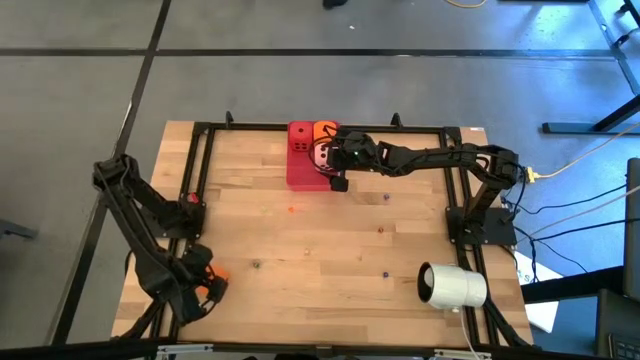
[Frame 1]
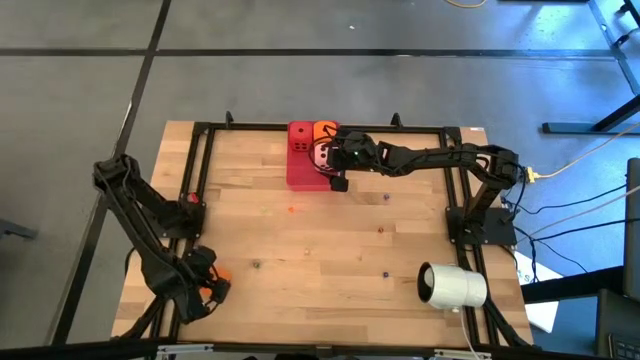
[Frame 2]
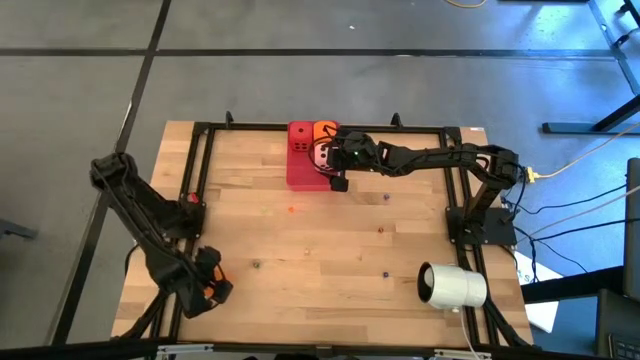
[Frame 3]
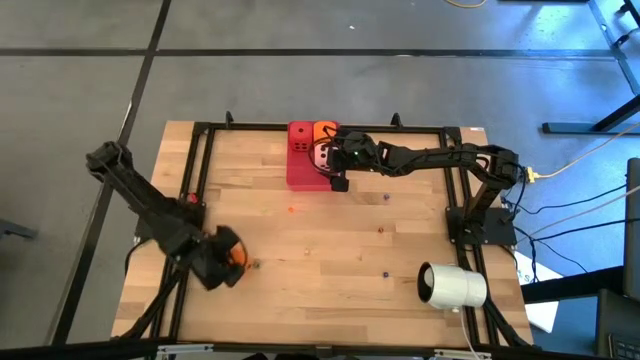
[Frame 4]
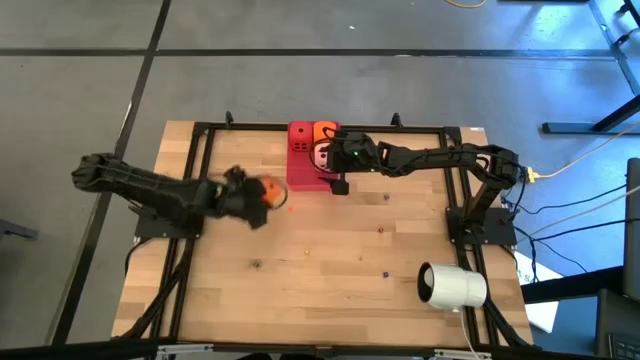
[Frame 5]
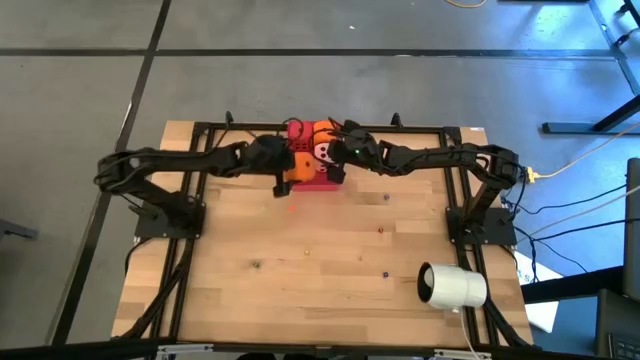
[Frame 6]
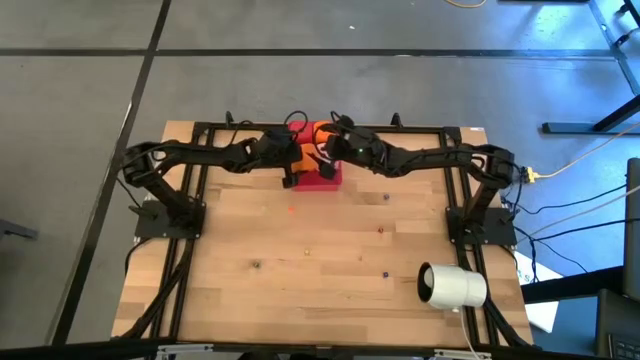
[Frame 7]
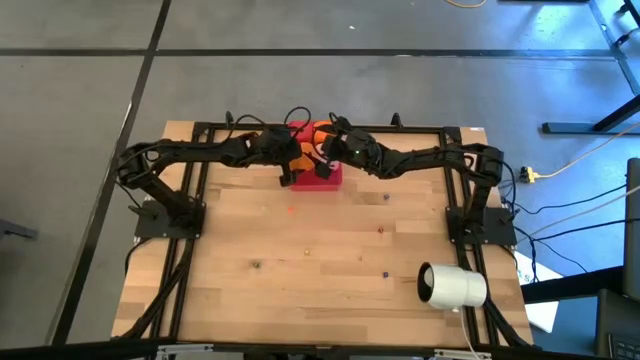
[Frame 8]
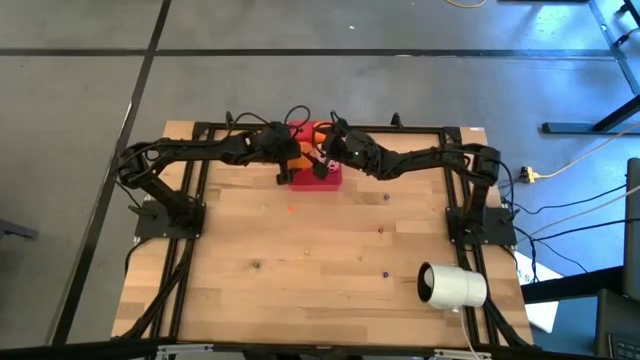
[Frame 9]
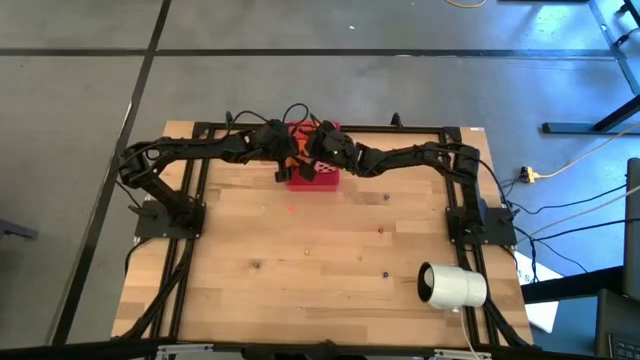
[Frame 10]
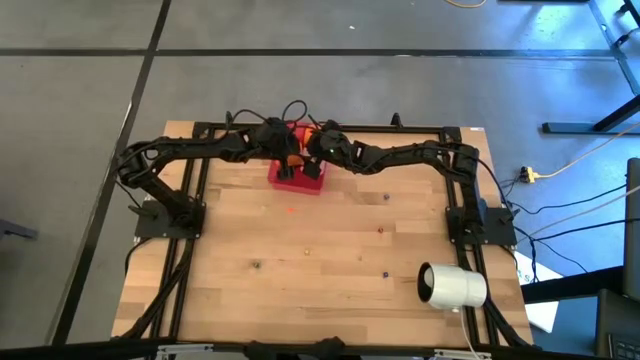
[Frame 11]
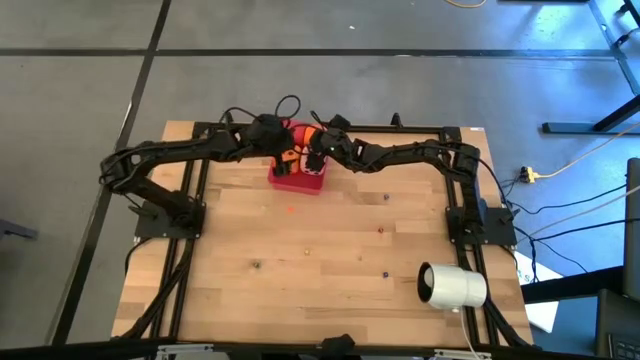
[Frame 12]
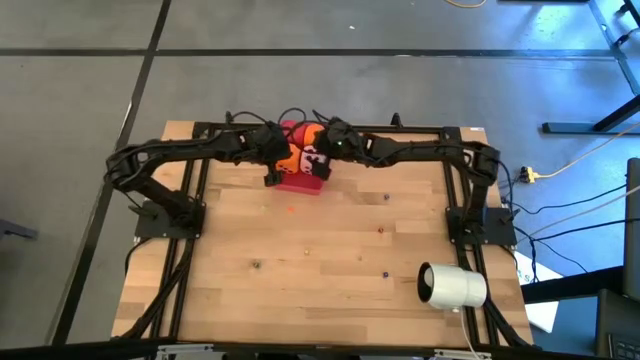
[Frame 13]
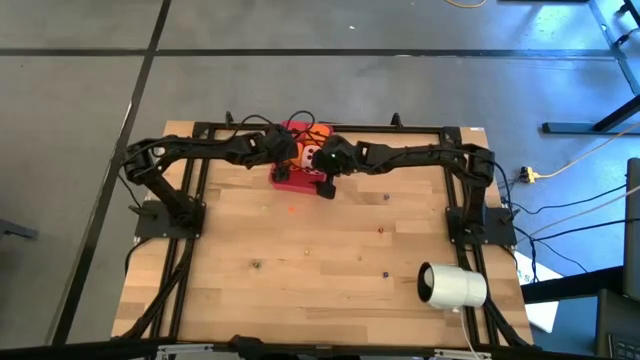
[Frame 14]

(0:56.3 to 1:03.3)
Task: Pick & Place Dice
Put the large orange dice into the bin

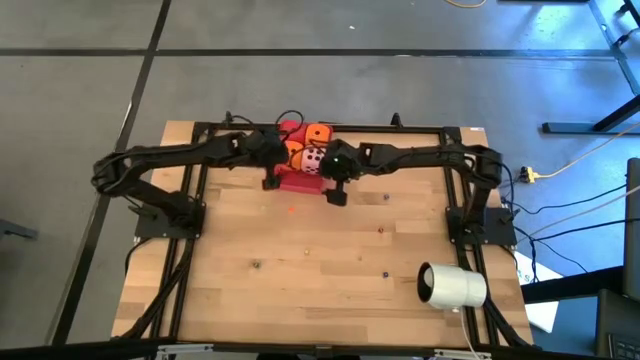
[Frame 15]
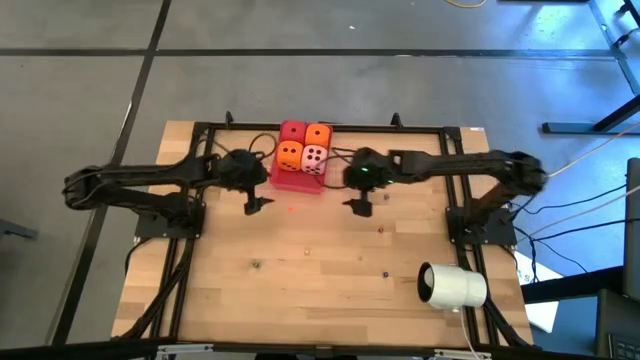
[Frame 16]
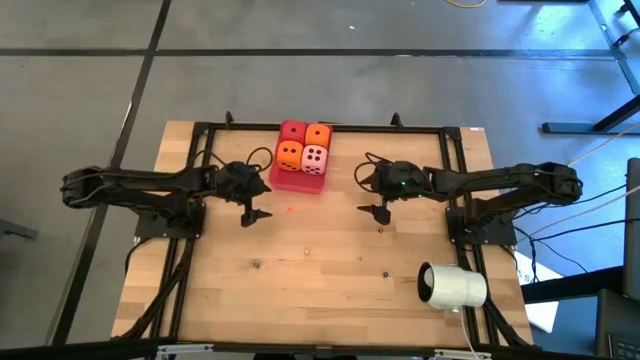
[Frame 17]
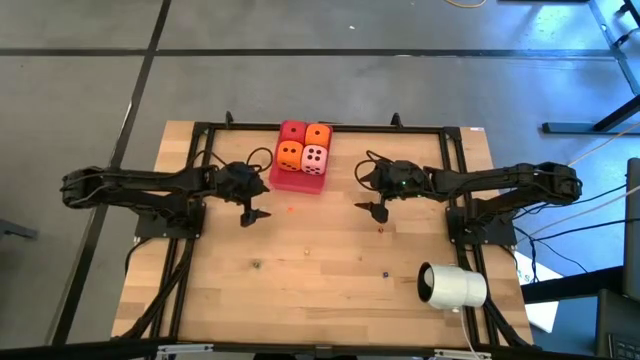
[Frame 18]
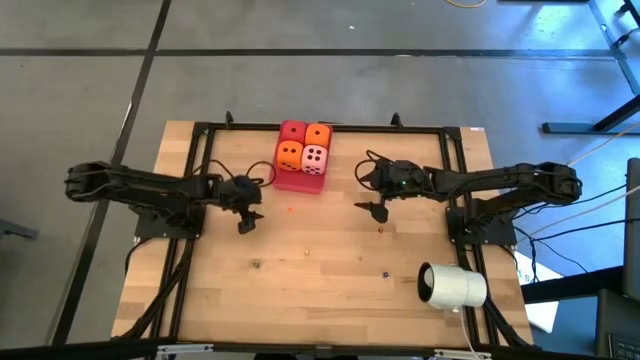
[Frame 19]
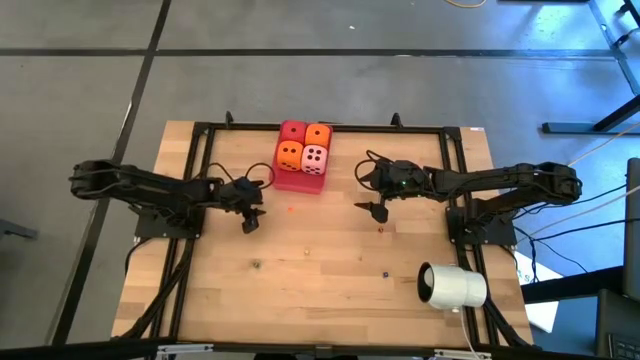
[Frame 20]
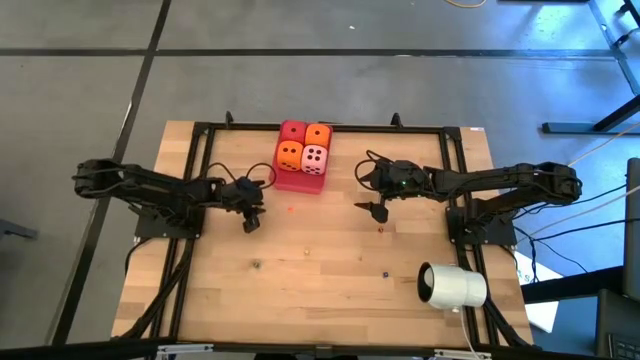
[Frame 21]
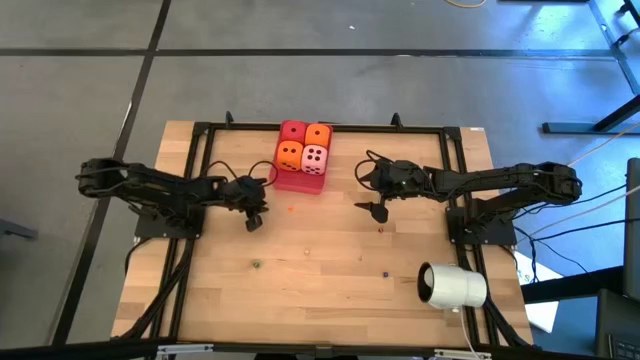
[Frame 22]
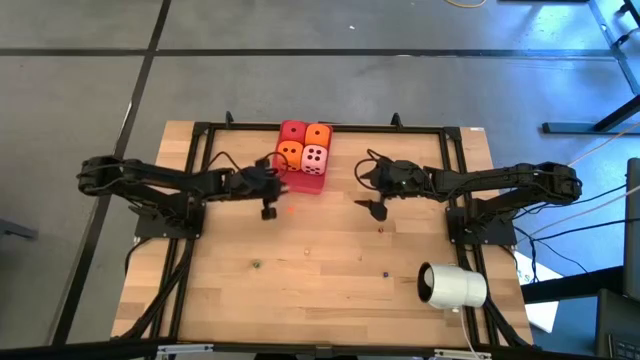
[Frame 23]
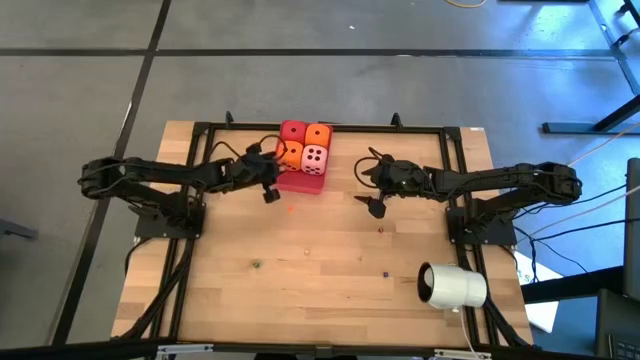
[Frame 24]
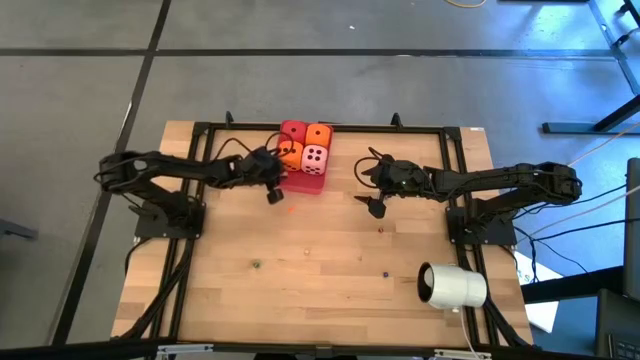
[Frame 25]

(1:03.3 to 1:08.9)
Put the small light green dice into the bin

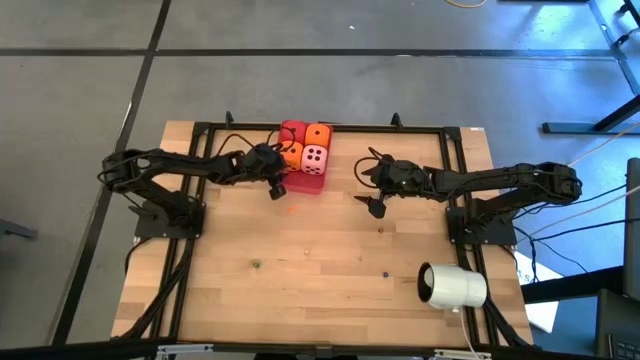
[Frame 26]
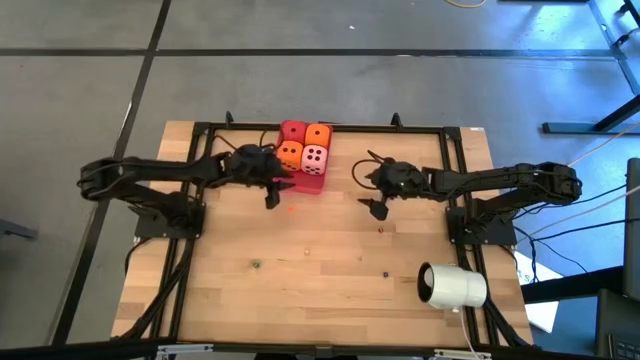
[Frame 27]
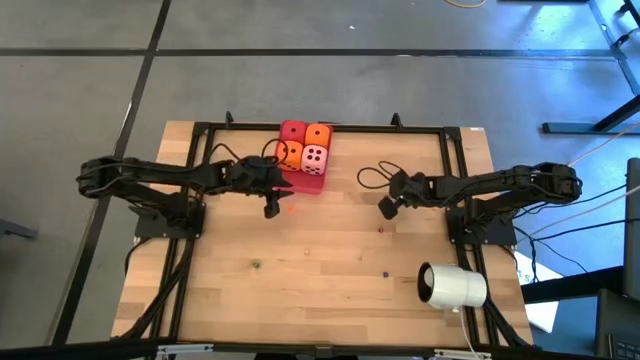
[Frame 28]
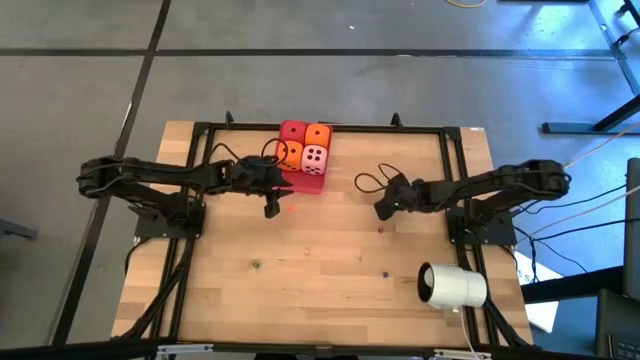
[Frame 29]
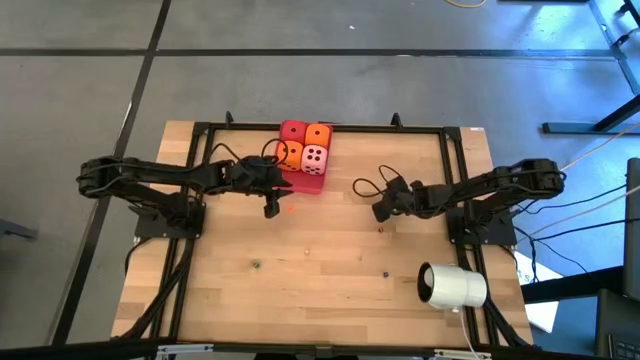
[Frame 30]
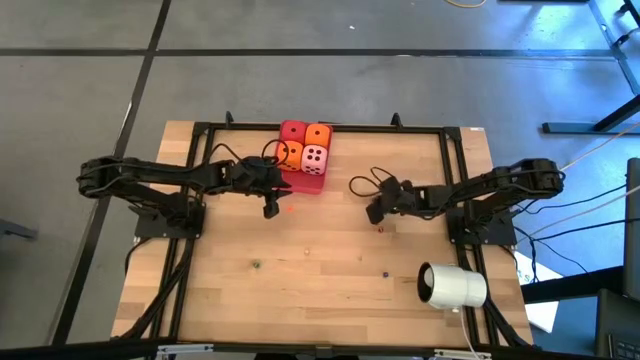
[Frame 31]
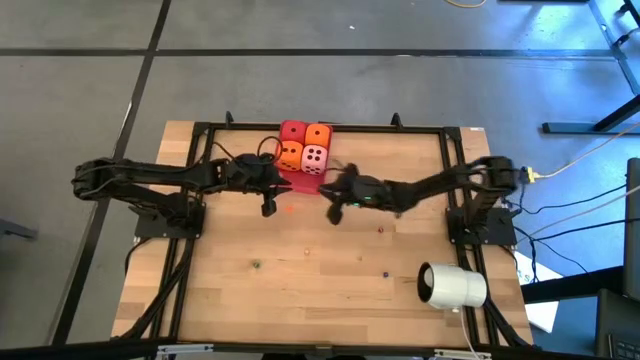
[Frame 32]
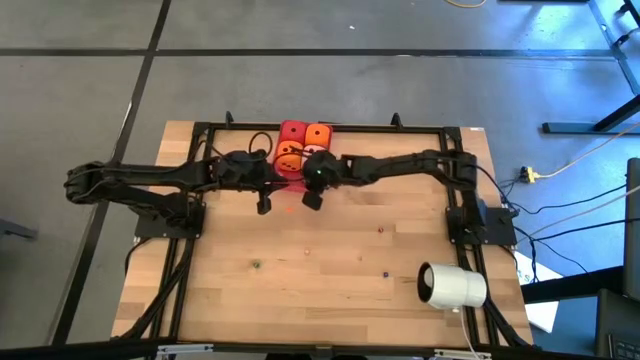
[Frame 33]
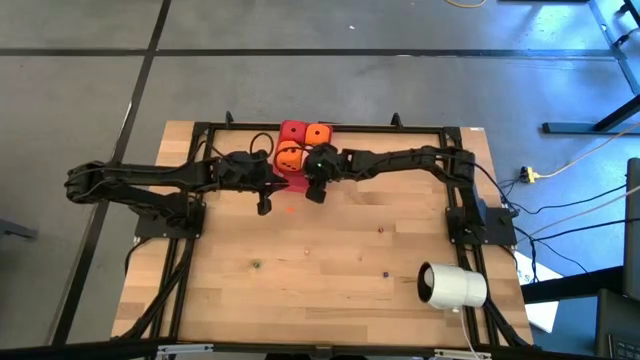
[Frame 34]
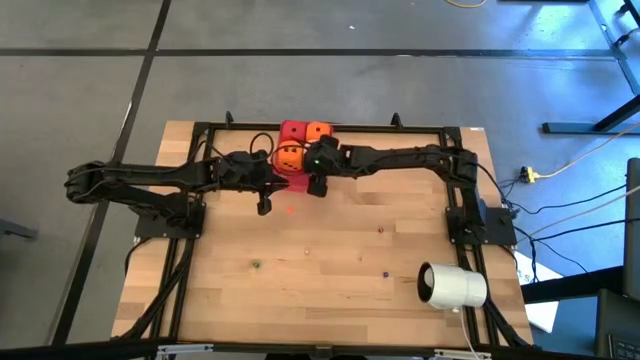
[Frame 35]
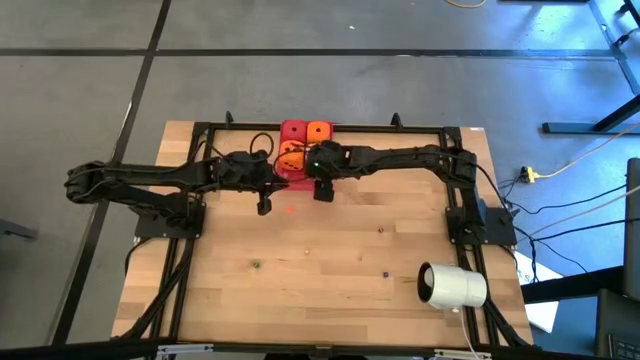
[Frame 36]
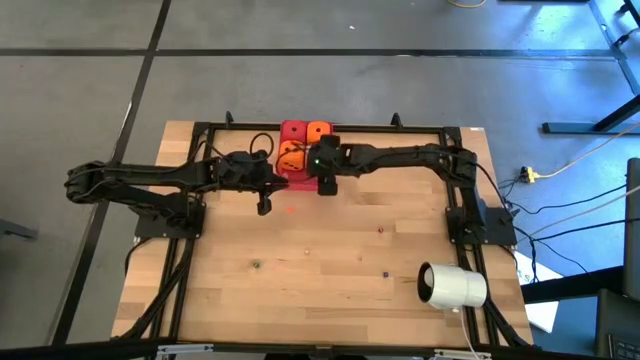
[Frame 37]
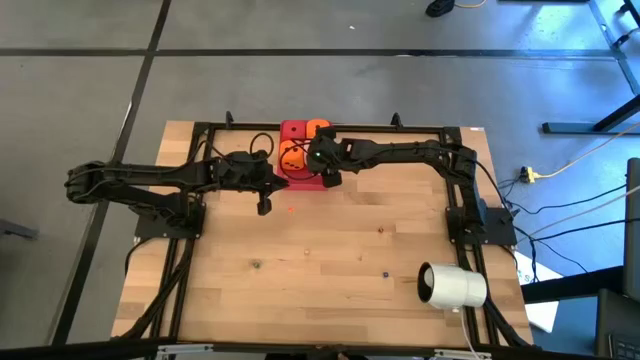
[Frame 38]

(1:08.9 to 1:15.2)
Put the top small blue dice into the bin

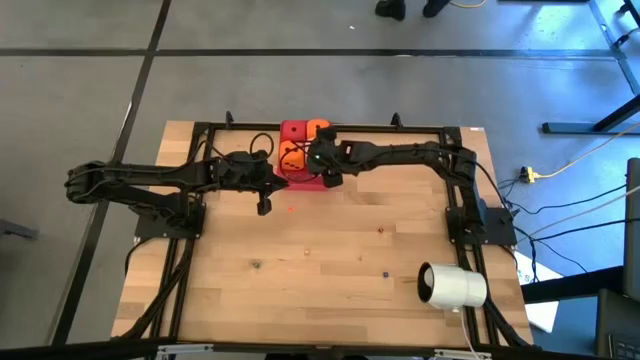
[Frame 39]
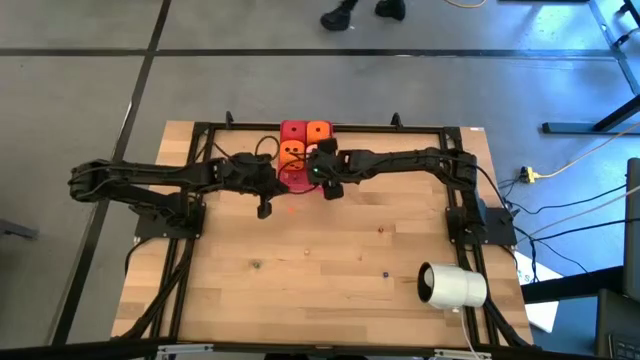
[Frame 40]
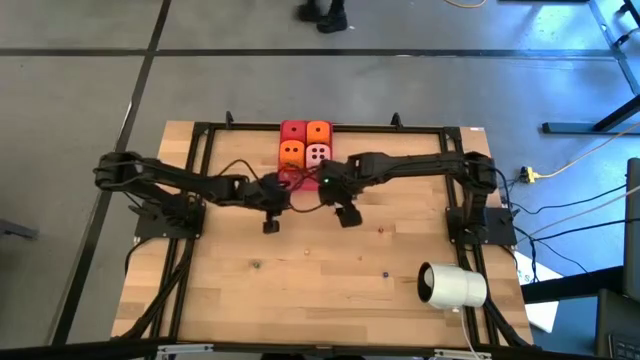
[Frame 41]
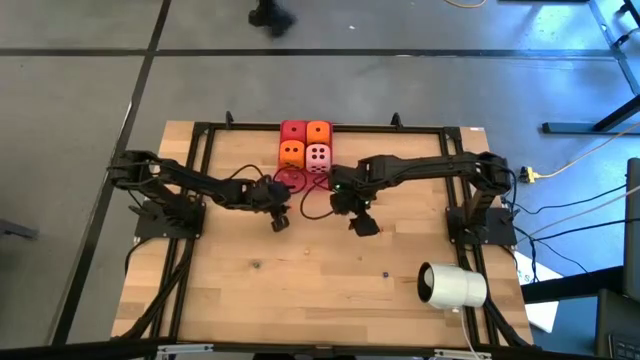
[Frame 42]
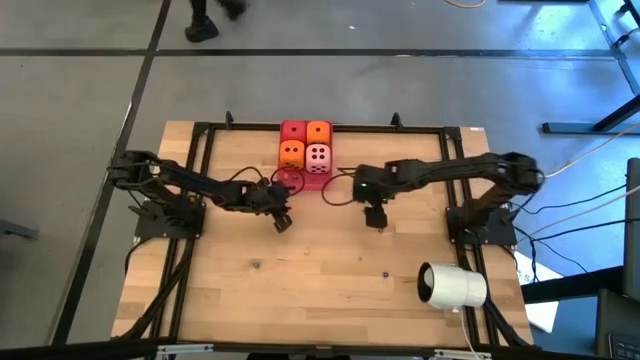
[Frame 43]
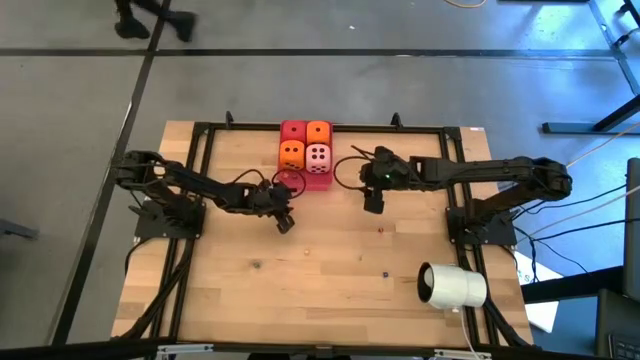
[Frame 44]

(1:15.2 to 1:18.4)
Put the small orange dice into the bin

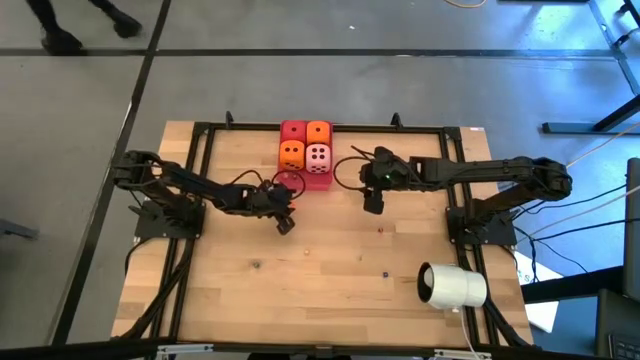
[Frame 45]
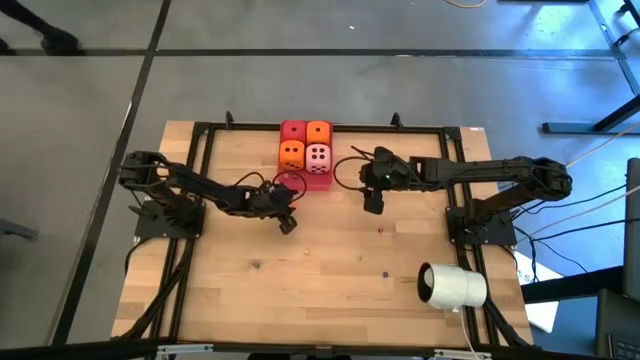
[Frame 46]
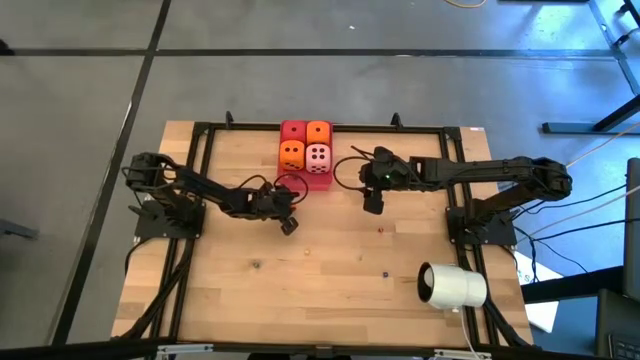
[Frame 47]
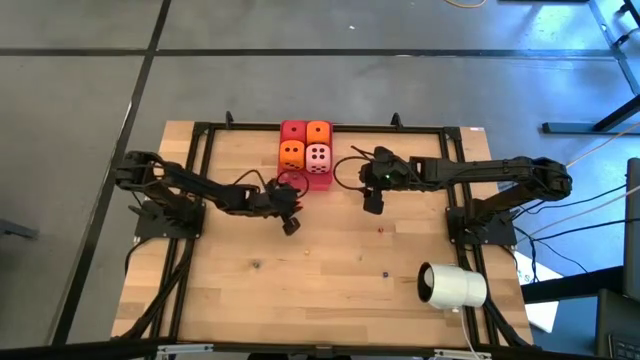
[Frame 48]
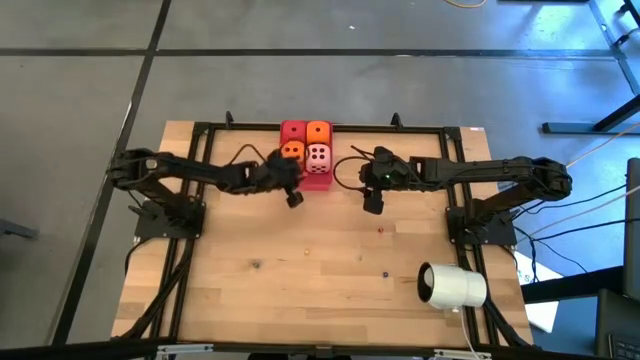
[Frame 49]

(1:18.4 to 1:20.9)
Put the small orange dice into the bin
